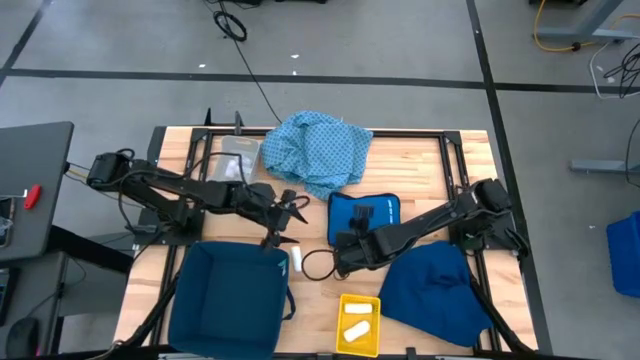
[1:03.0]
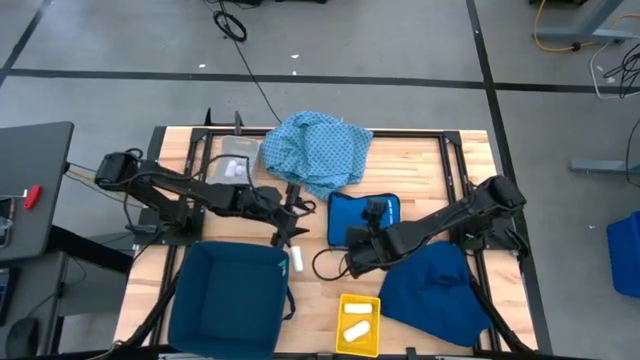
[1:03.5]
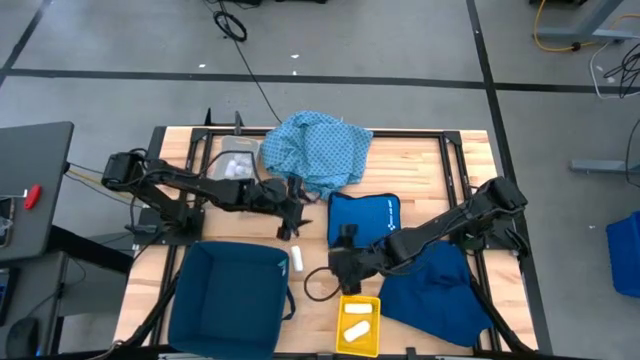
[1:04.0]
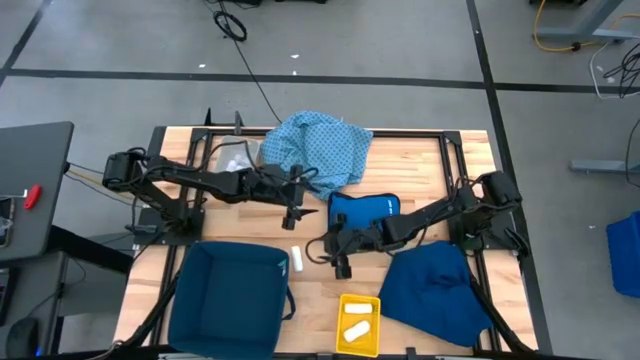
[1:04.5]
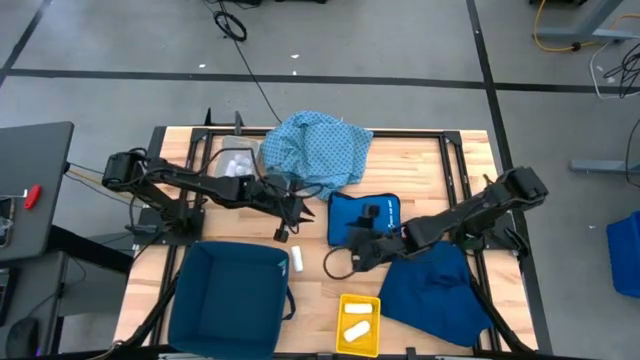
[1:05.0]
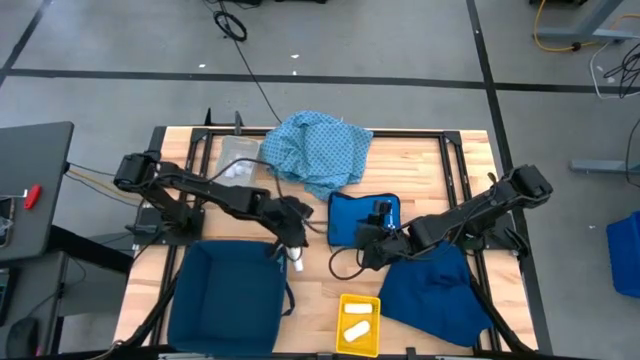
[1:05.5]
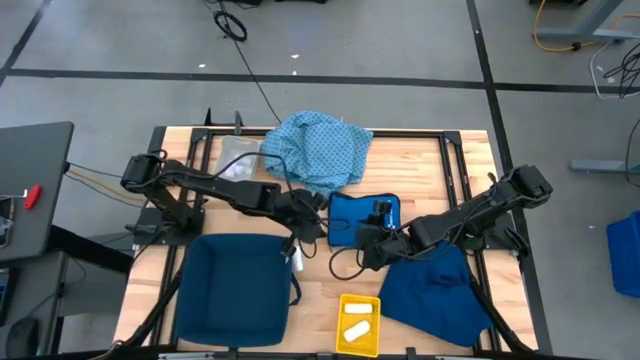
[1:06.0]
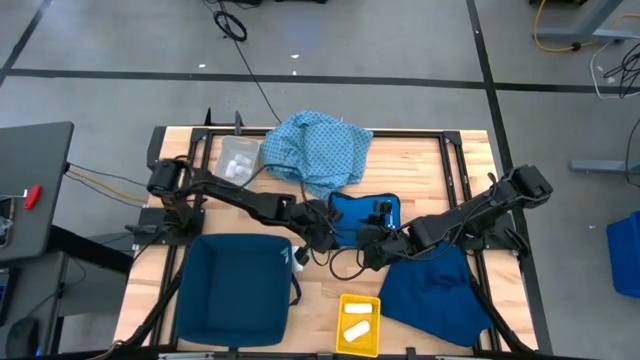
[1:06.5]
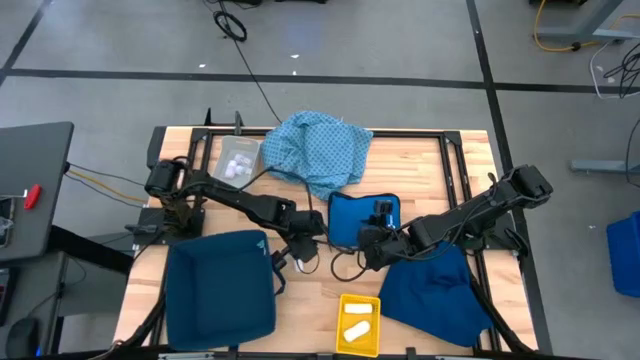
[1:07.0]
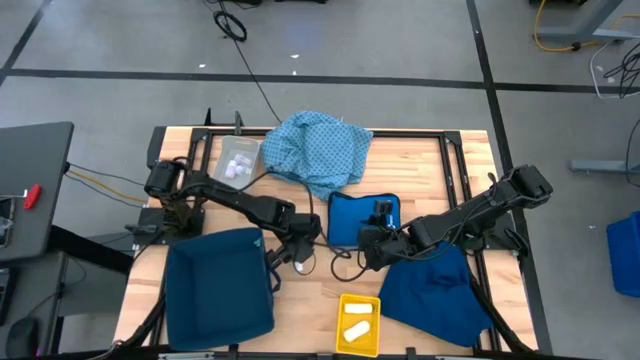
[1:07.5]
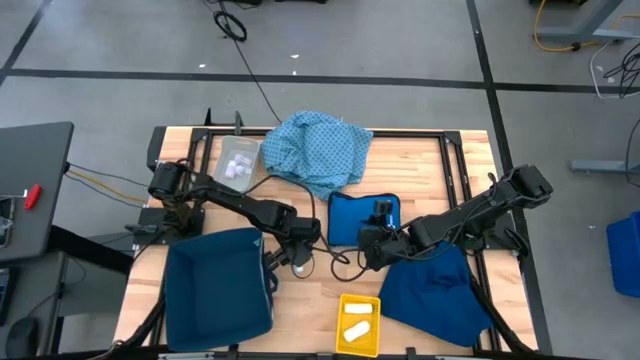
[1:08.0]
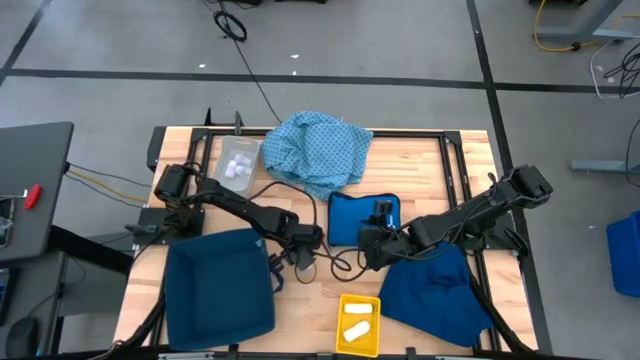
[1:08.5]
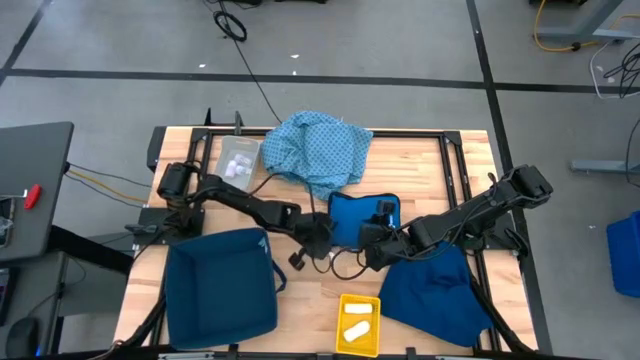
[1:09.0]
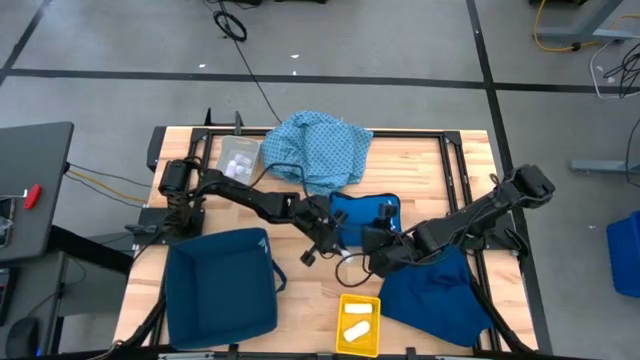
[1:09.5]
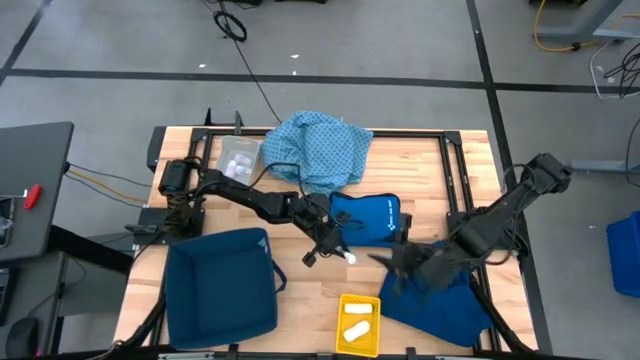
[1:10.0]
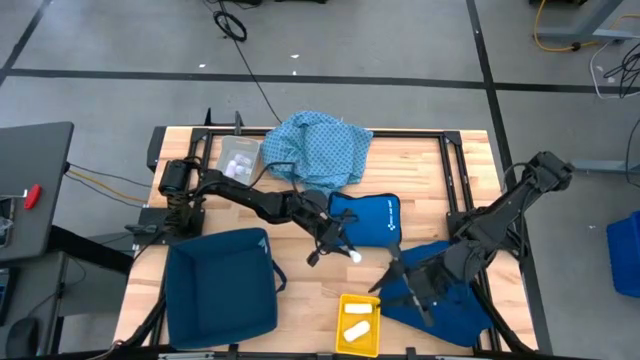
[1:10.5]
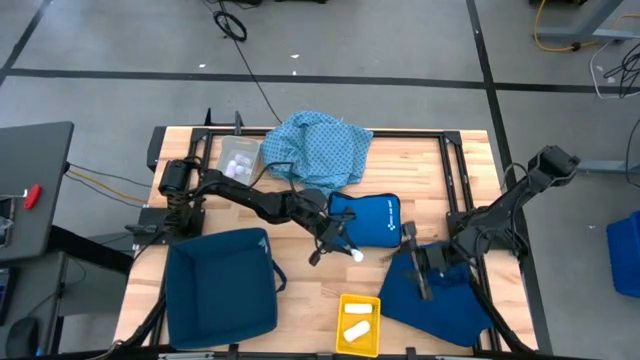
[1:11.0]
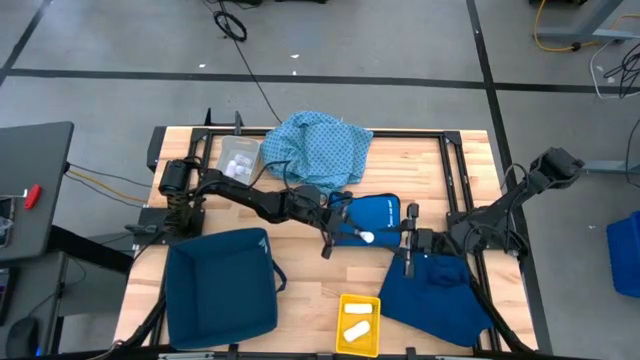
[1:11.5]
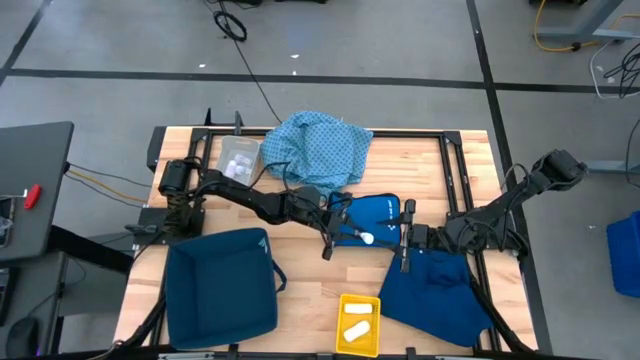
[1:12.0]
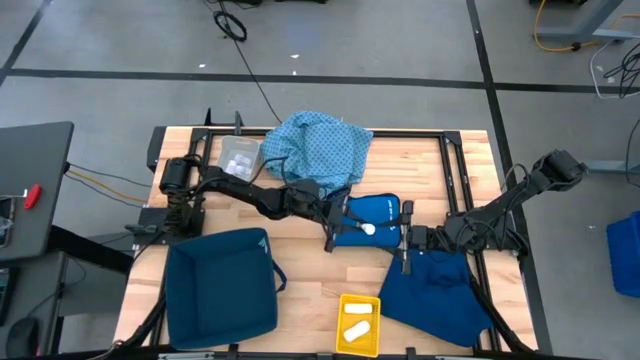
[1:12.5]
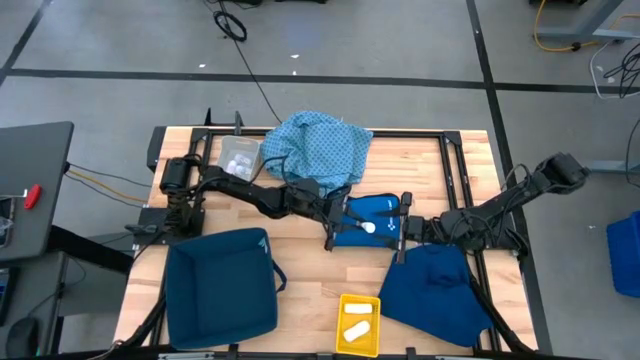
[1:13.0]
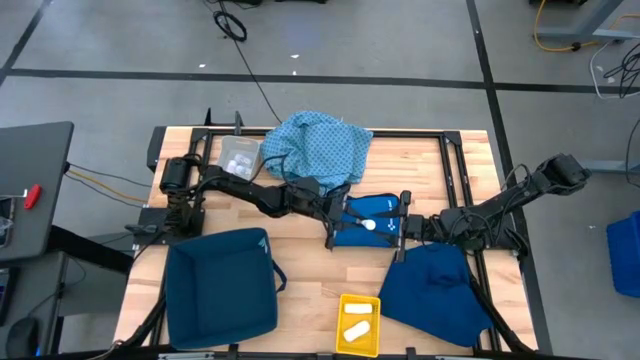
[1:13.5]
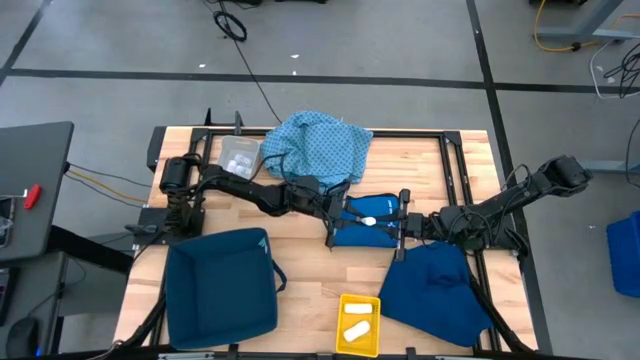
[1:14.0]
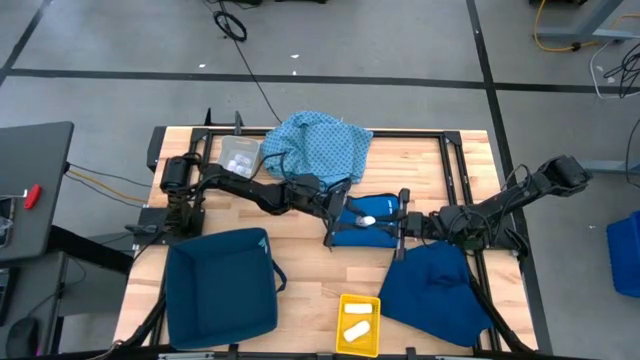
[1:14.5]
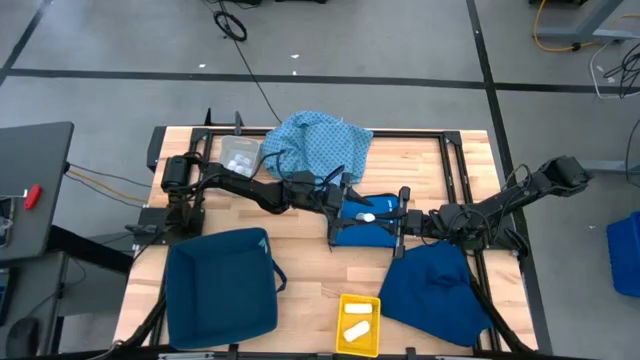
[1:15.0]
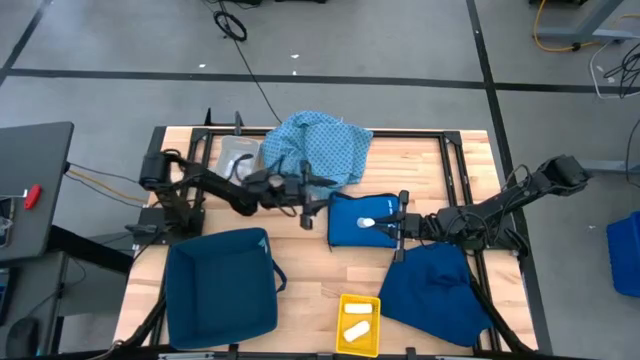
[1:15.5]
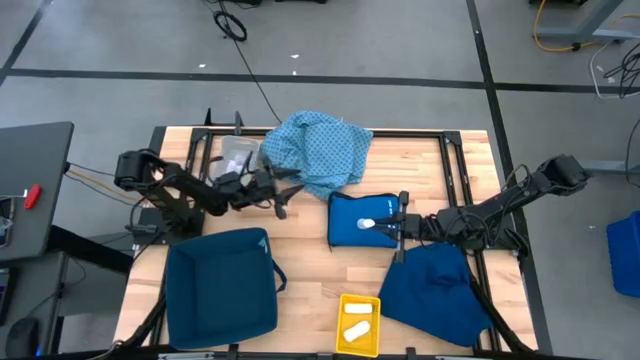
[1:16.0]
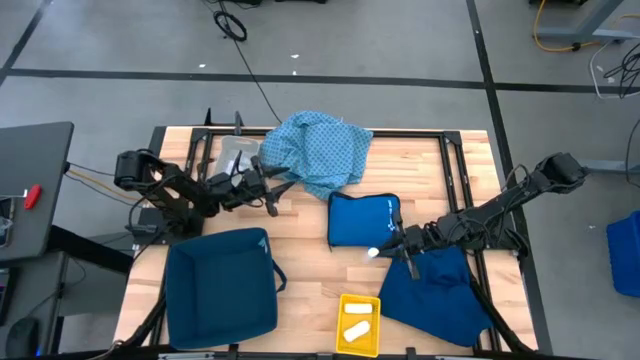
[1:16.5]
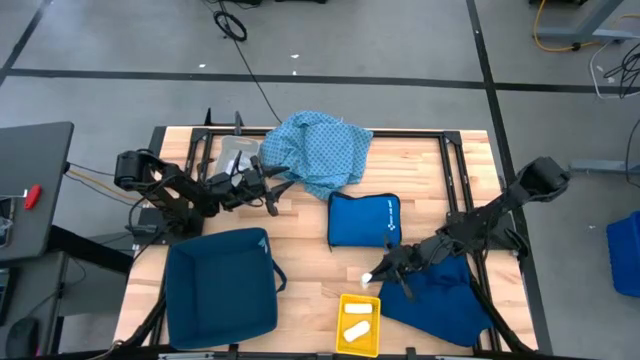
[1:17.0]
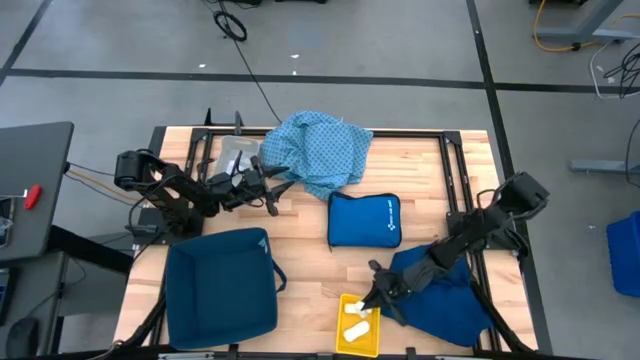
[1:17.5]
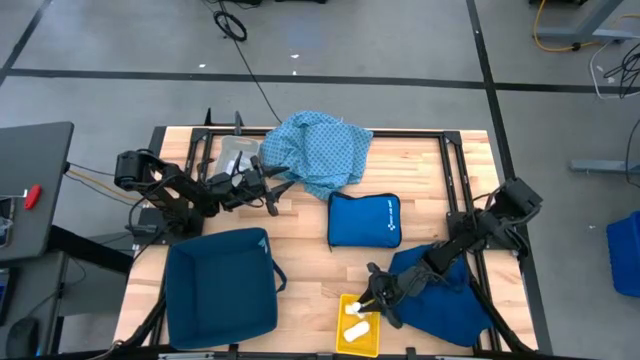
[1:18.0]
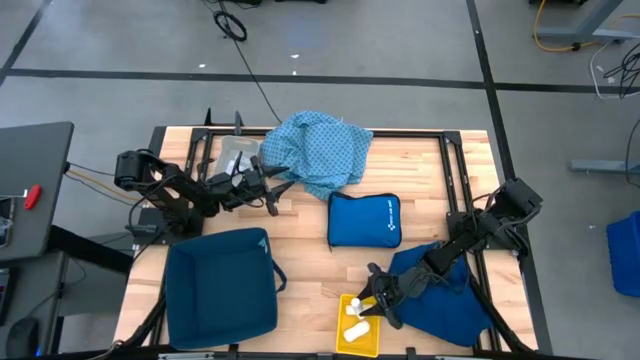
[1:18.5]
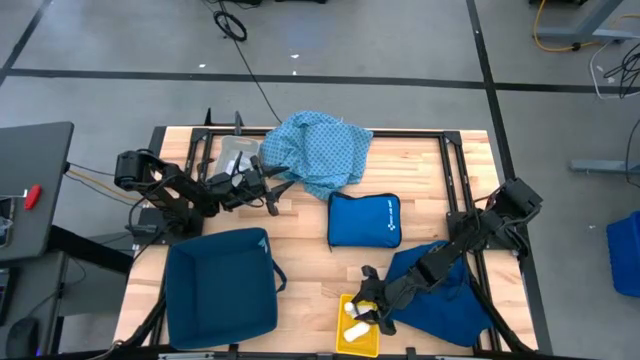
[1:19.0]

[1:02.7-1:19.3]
Task: Pick & place medical supplies in basket/bin
Put the rolled gauze into the yellow bin

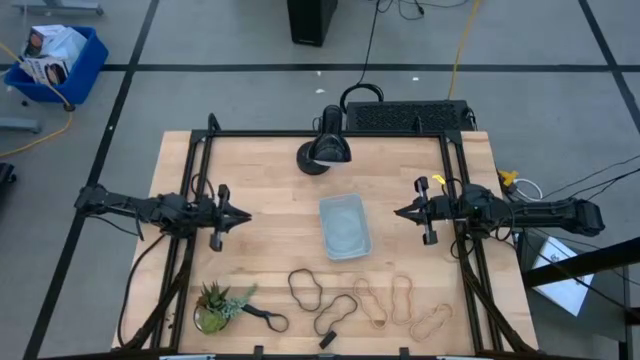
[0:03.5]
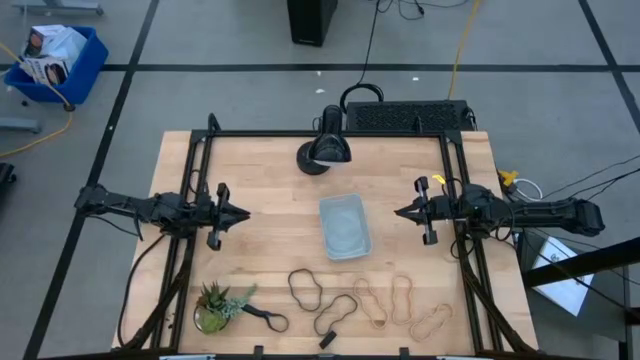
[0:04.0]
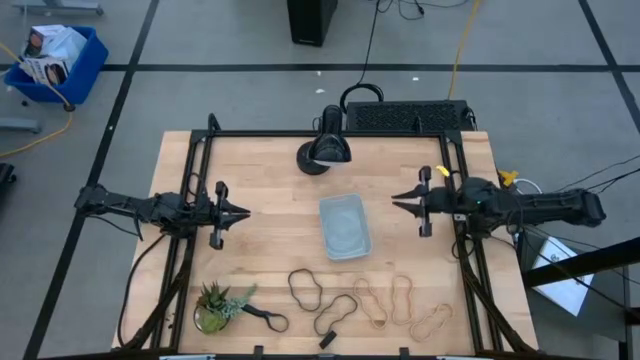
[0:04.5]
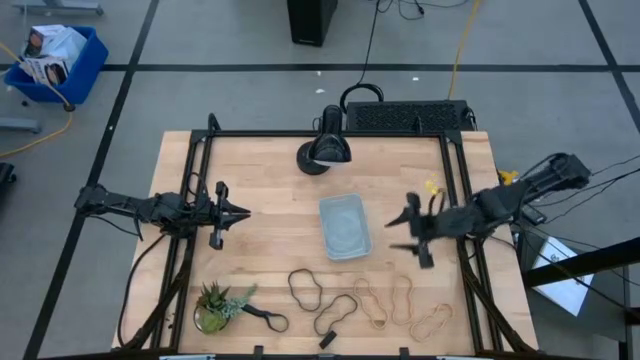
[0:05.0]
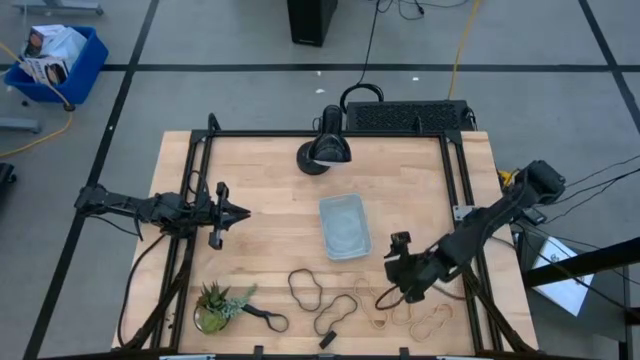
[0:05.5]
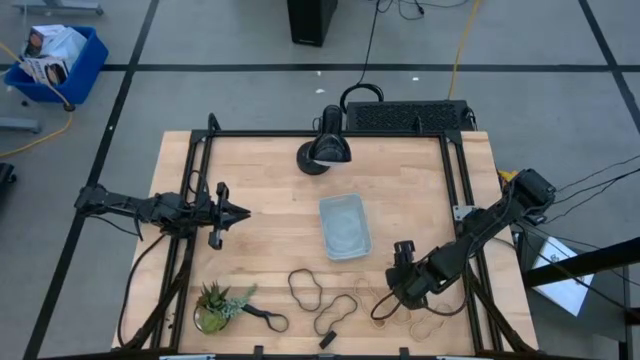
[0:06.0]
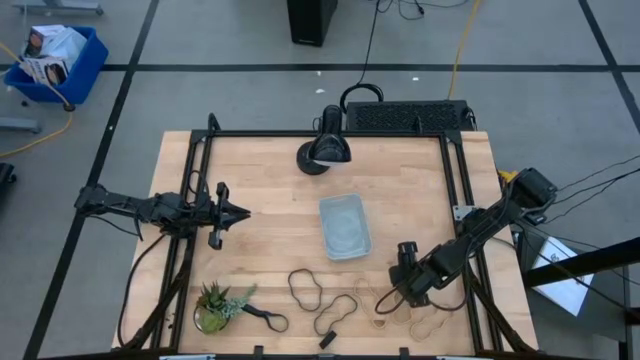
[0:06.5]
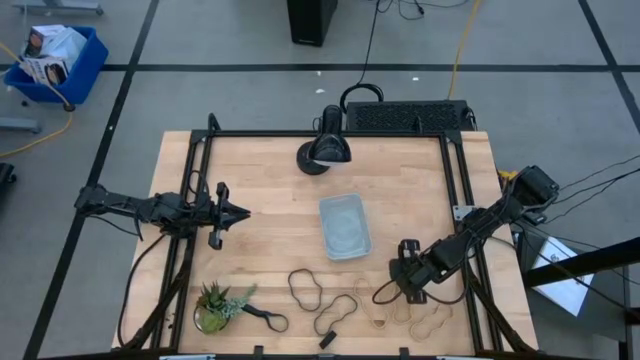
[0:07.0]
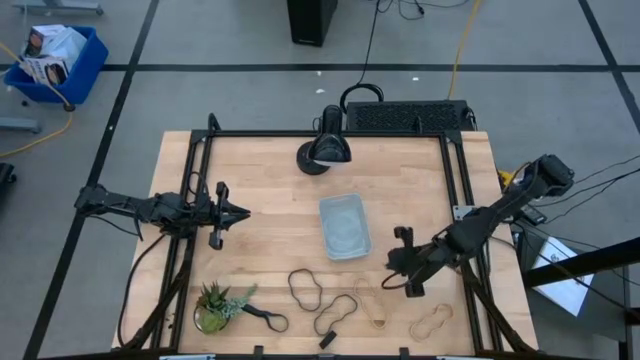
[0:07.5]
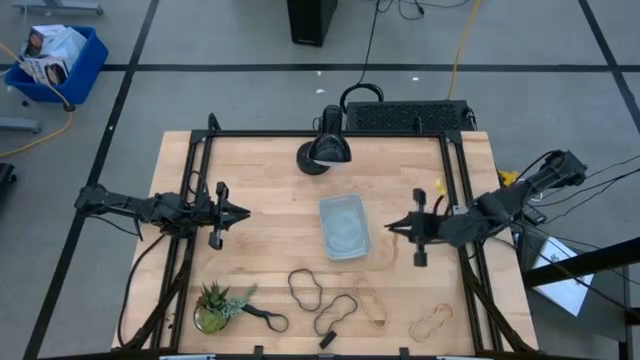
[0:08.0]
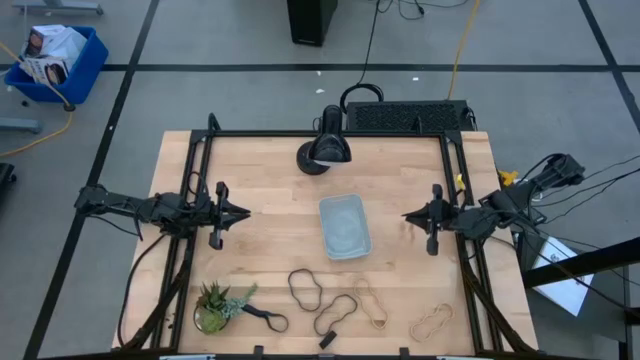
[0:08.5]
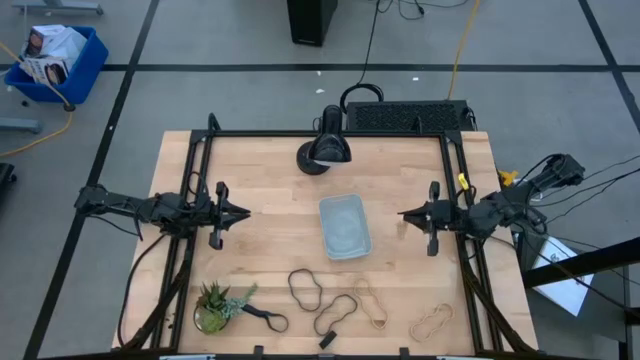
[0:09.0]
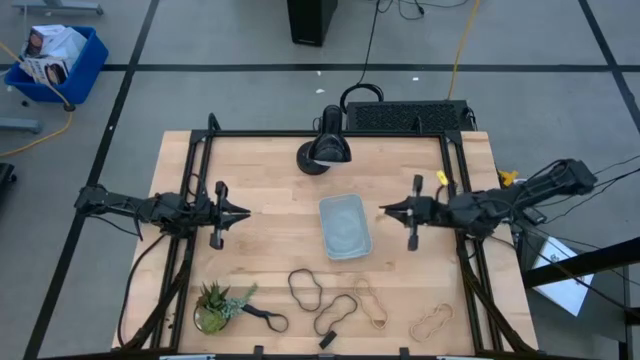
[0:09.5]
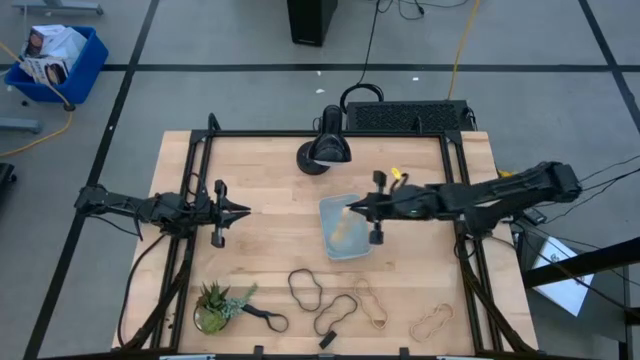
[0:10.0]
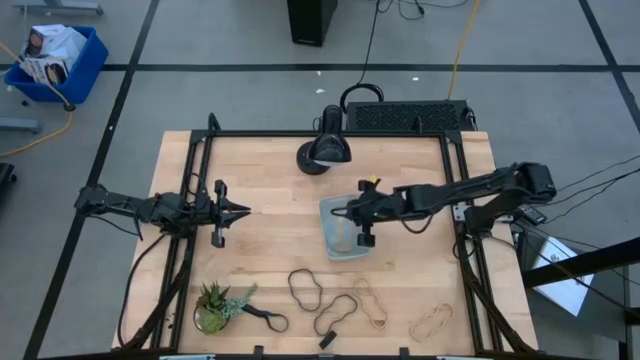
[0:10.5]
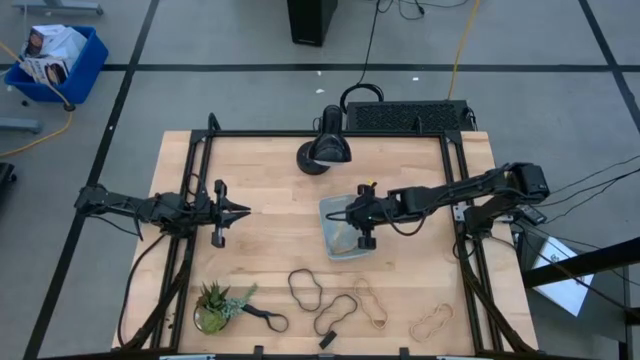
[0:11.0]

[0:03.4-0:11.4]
Task: Pick and place rubber bands into bin
Put the middle light orange rubber band into the gray bin
